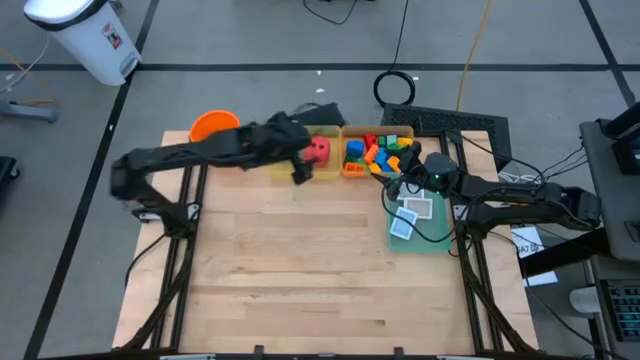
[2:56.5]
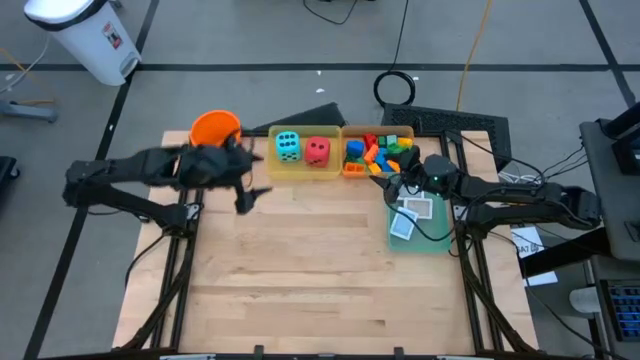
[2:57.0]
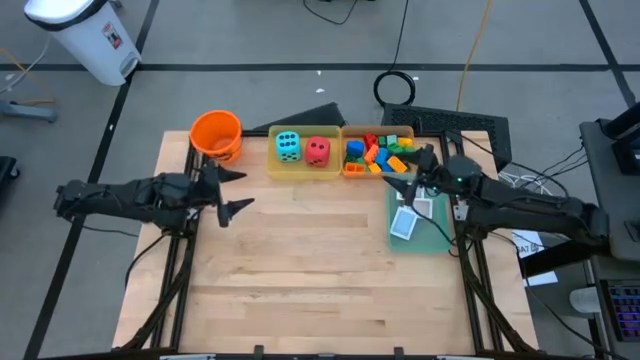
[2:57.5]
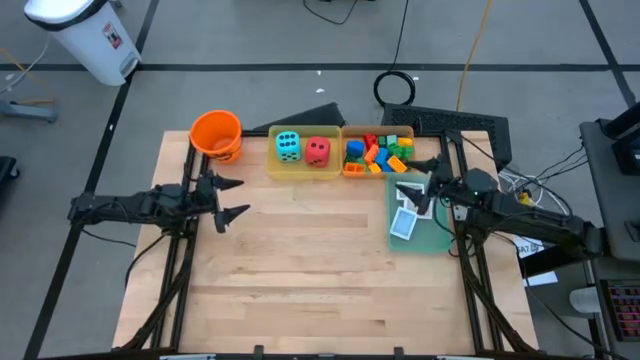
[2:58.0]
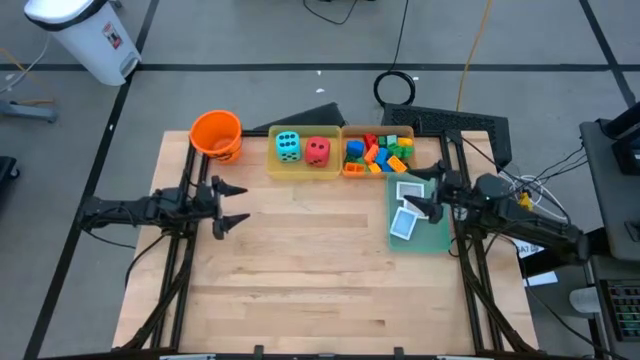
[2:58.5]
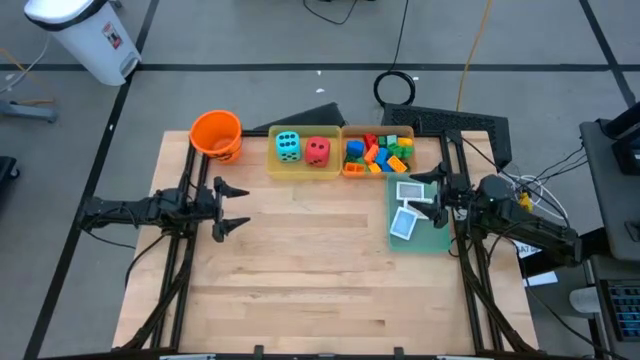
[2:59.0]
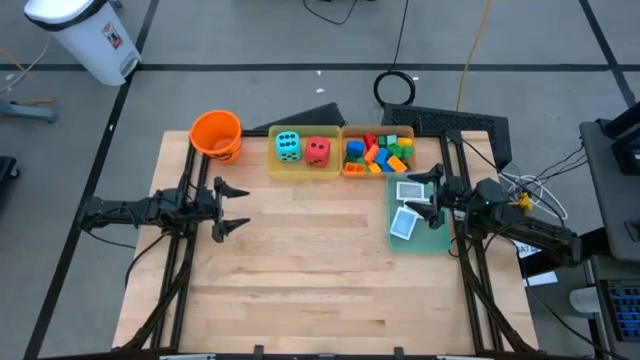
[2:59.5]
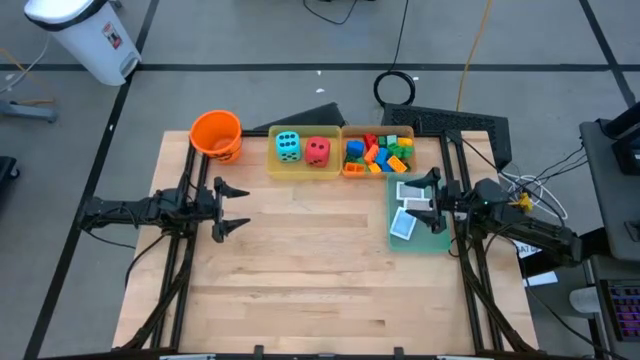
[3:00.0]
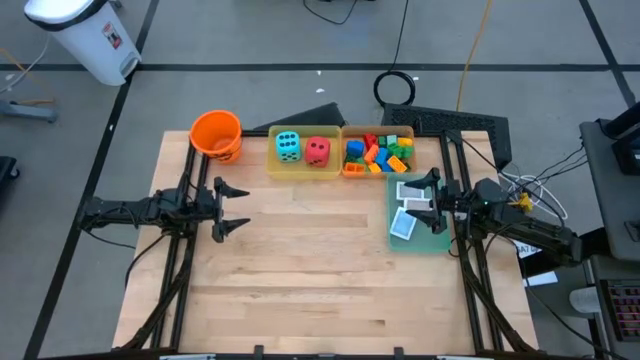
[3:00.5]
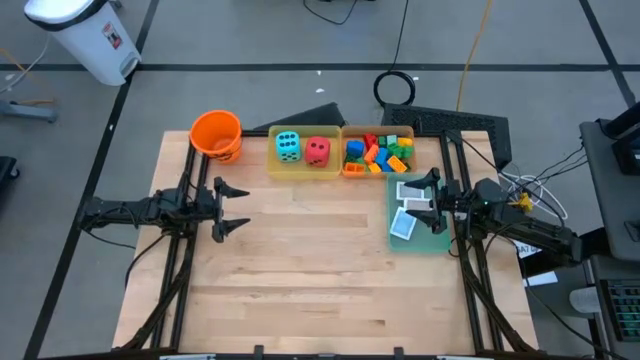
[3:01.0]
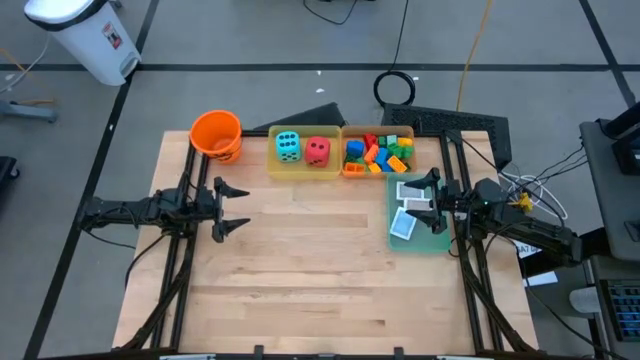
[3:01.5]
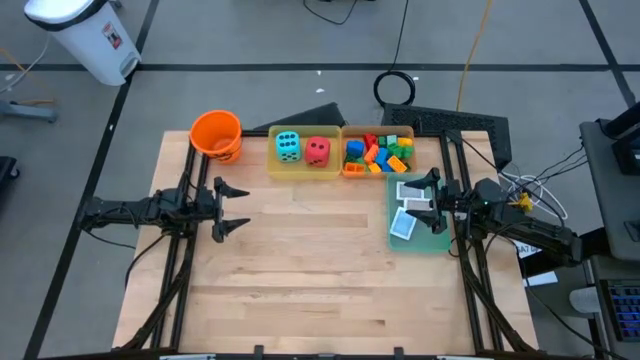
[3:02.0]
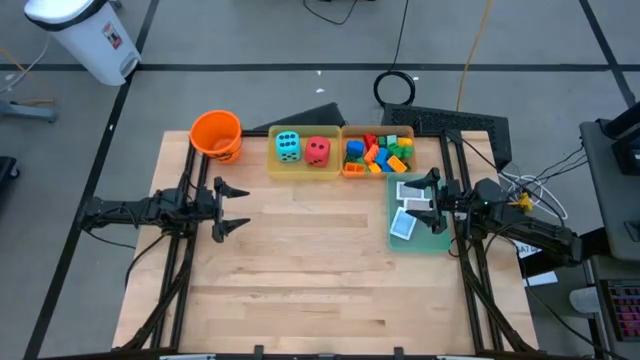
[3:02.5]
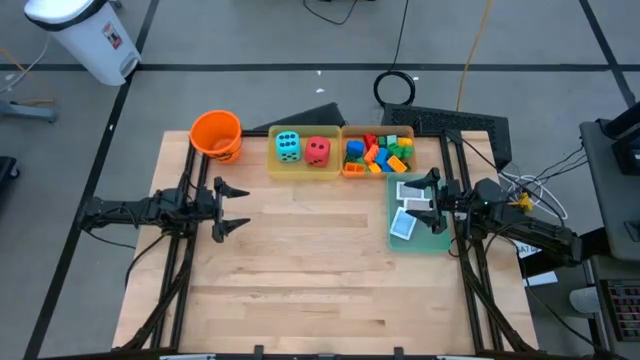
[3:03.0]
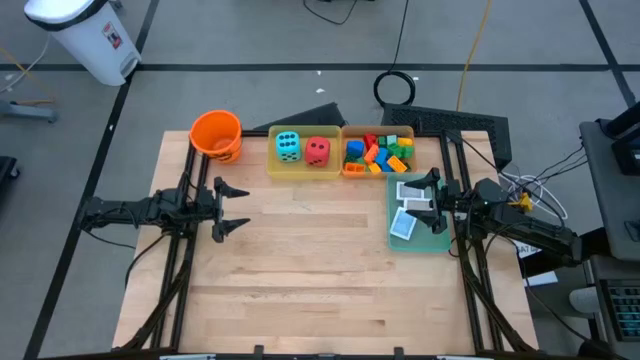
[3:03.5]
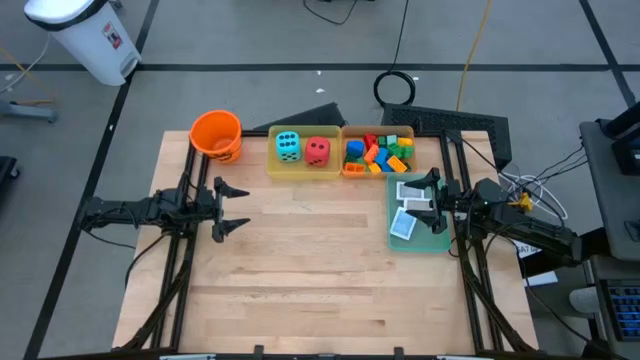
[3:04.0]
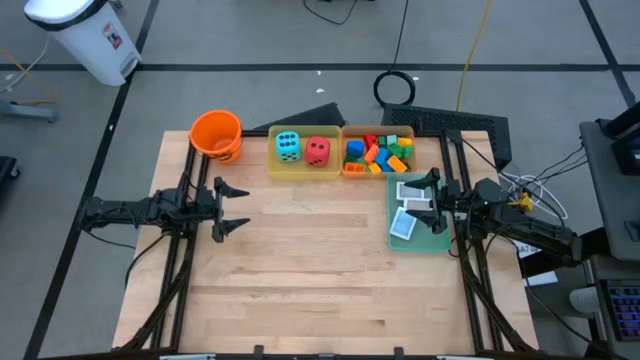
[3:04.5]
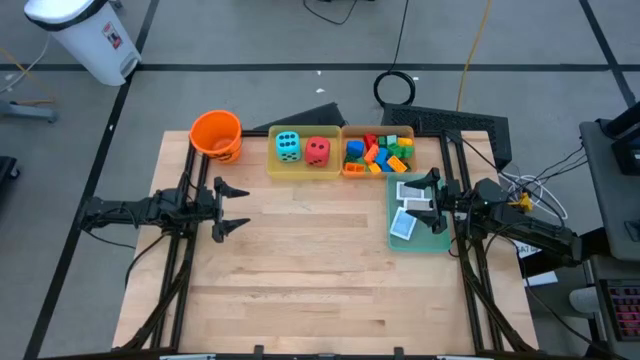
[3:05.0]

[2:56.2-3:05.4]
Task: Pick & Place Toys
Return to Home Position

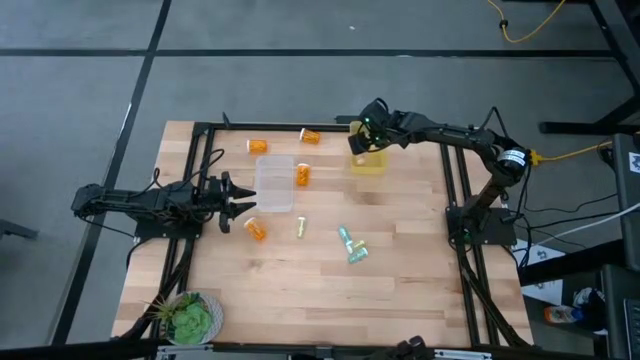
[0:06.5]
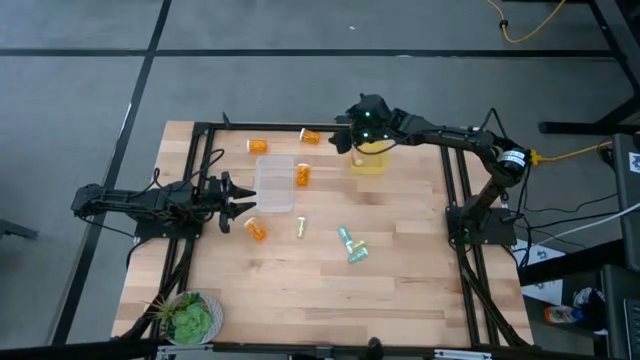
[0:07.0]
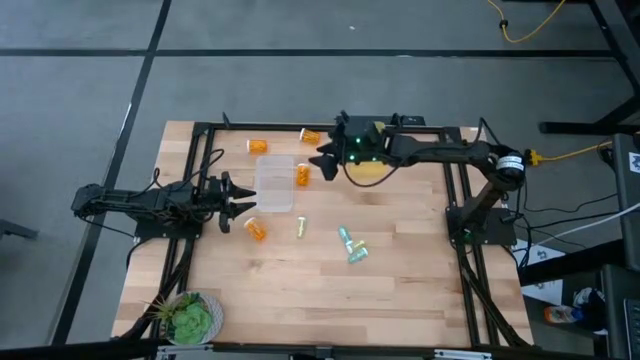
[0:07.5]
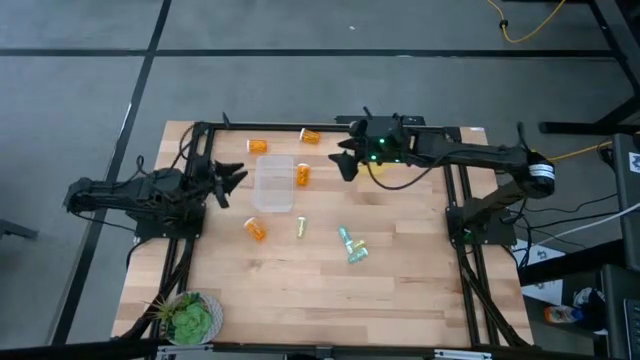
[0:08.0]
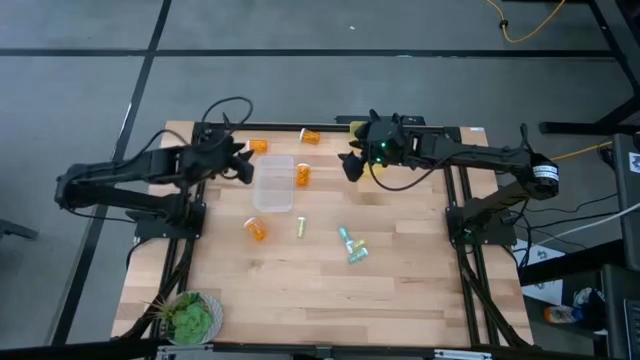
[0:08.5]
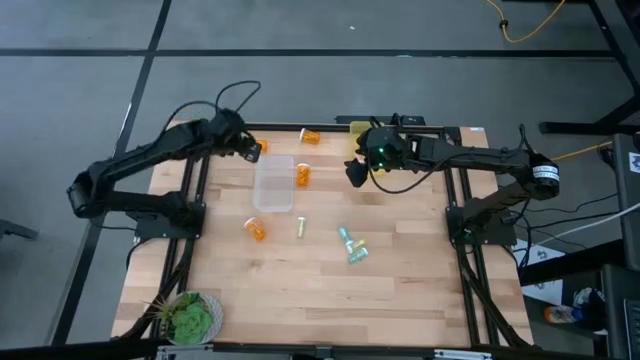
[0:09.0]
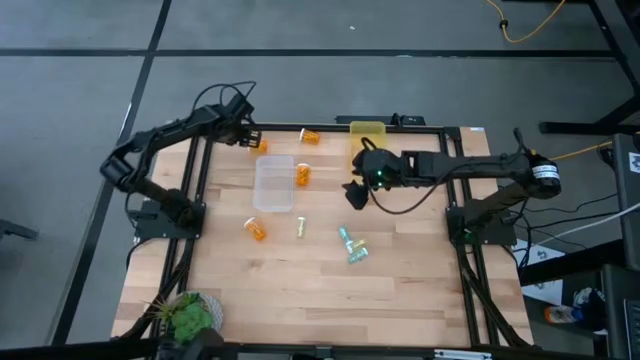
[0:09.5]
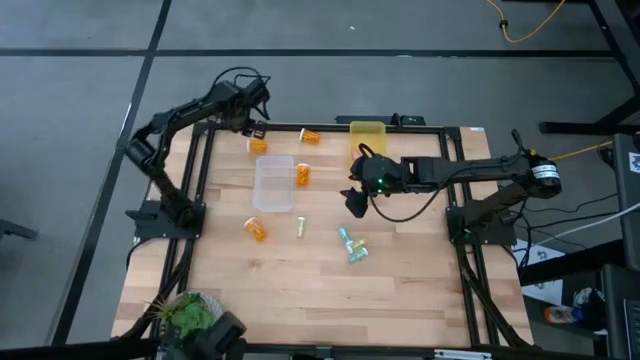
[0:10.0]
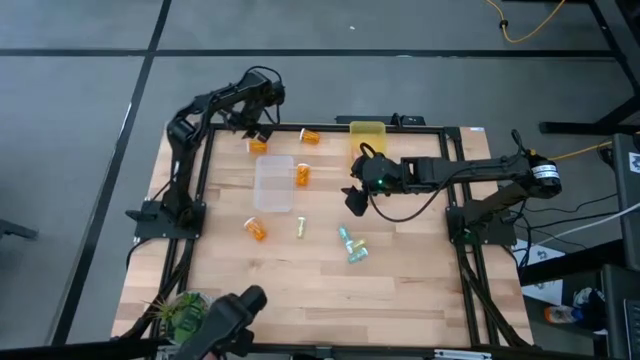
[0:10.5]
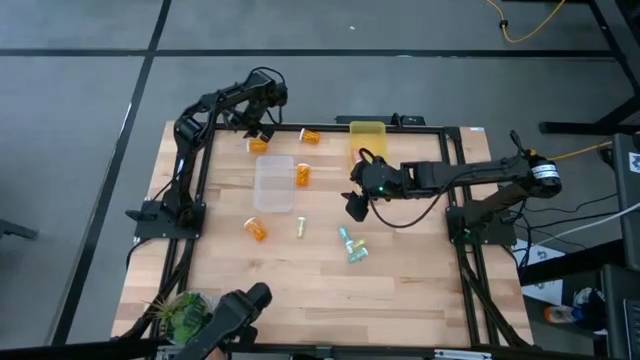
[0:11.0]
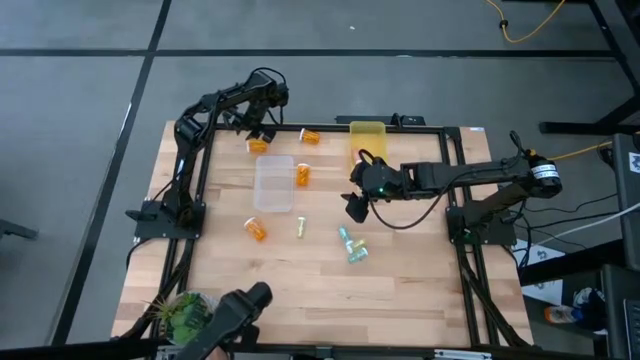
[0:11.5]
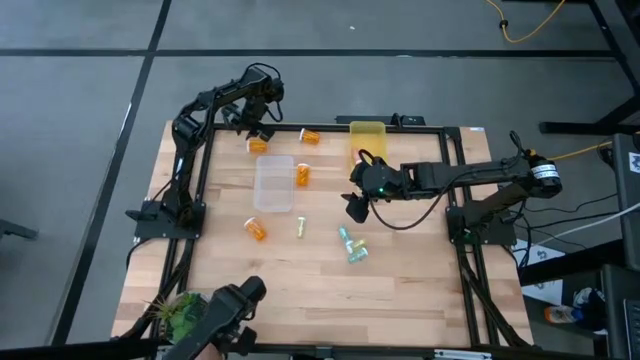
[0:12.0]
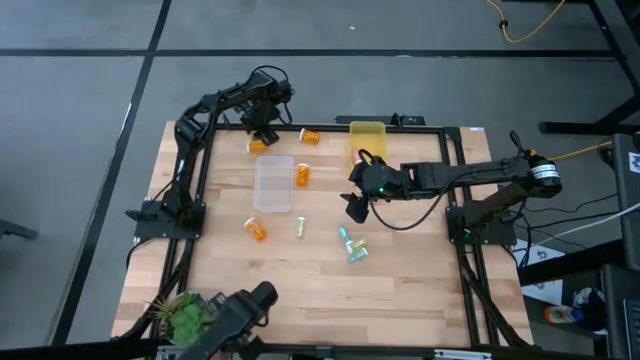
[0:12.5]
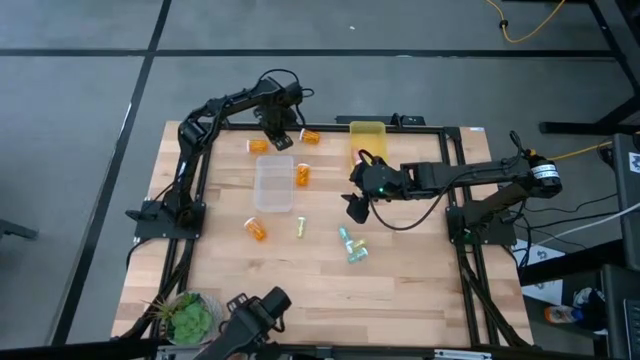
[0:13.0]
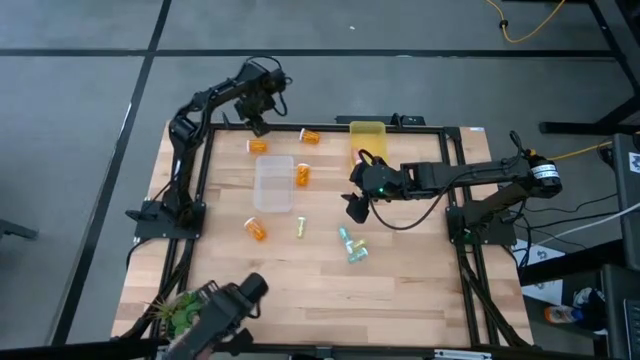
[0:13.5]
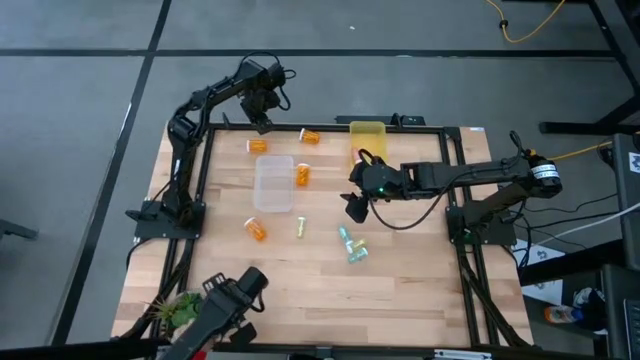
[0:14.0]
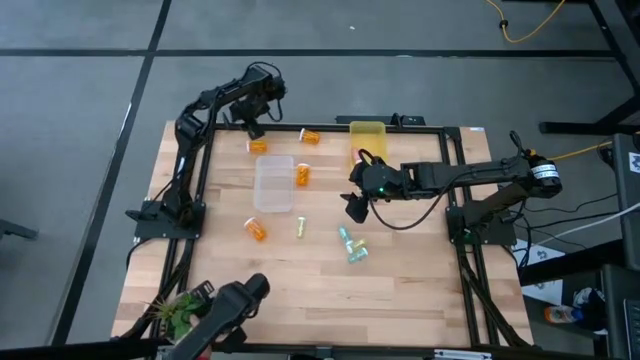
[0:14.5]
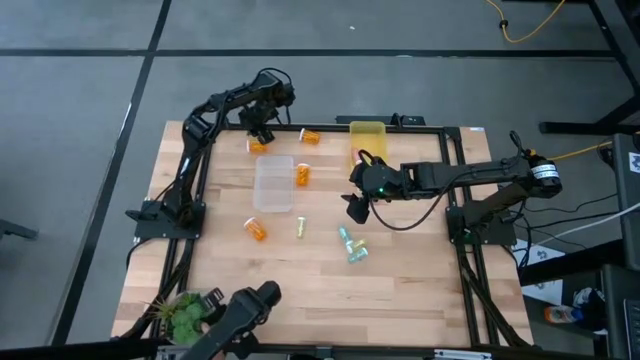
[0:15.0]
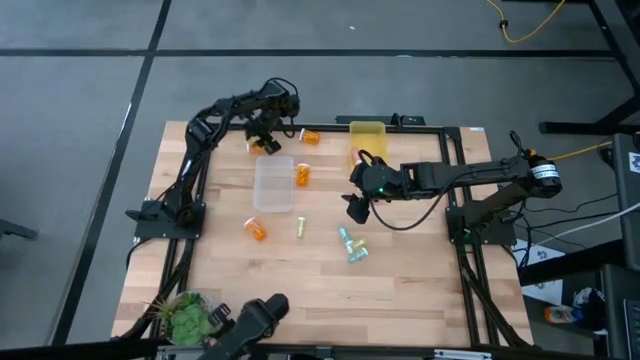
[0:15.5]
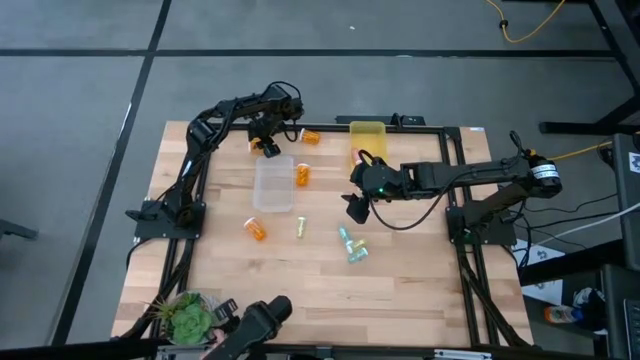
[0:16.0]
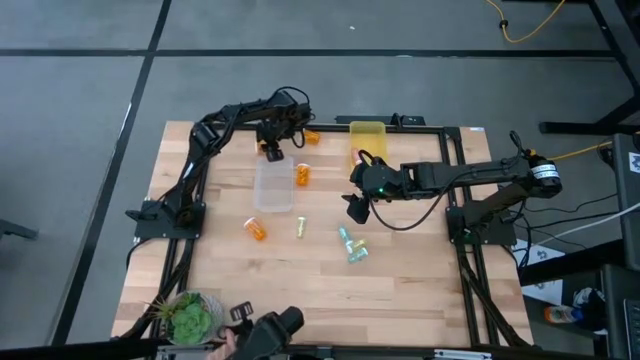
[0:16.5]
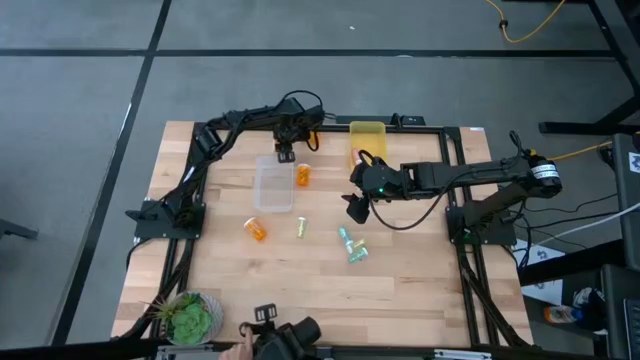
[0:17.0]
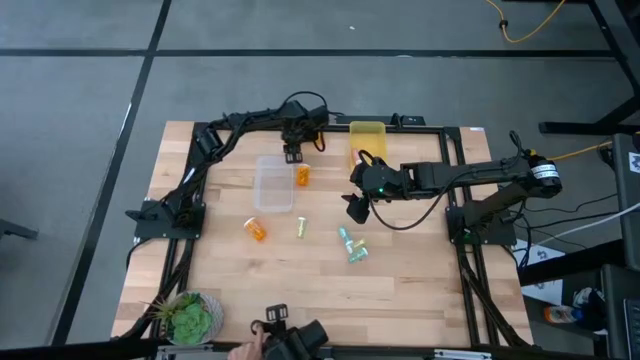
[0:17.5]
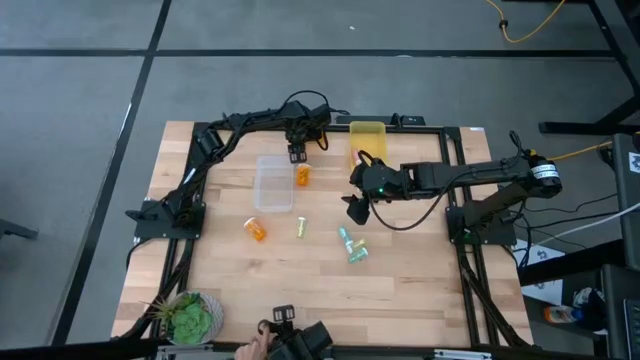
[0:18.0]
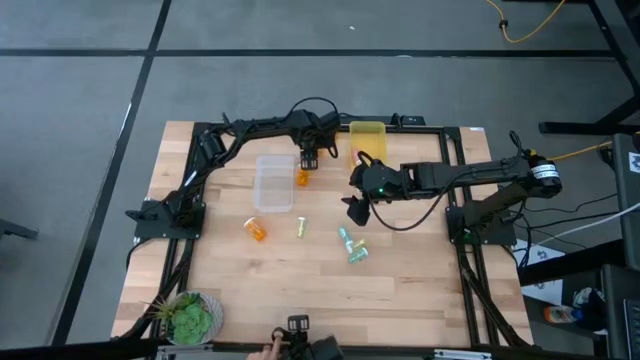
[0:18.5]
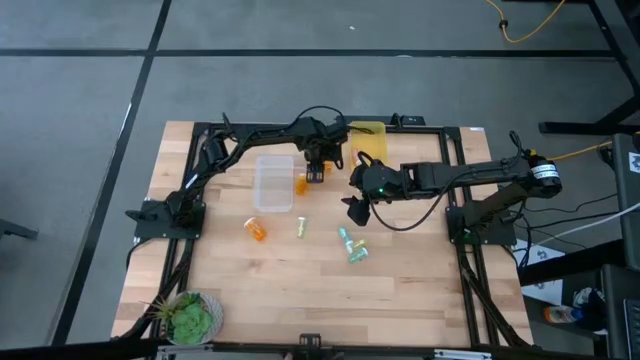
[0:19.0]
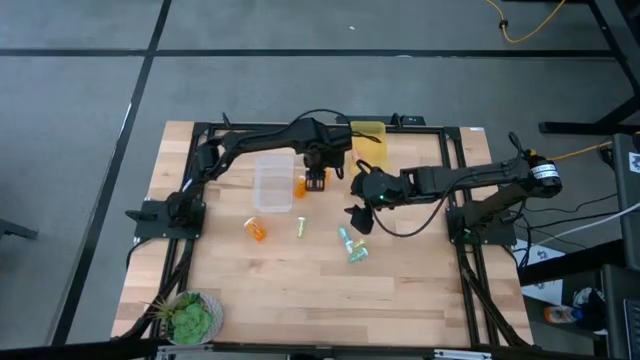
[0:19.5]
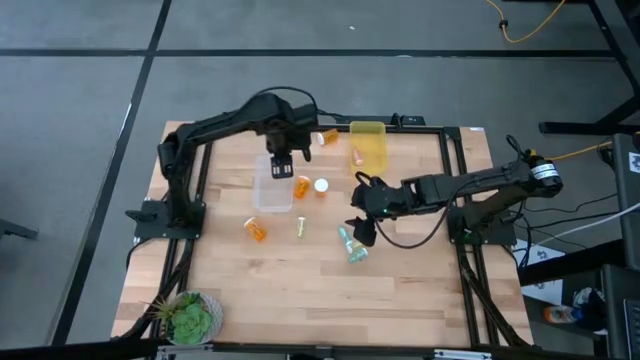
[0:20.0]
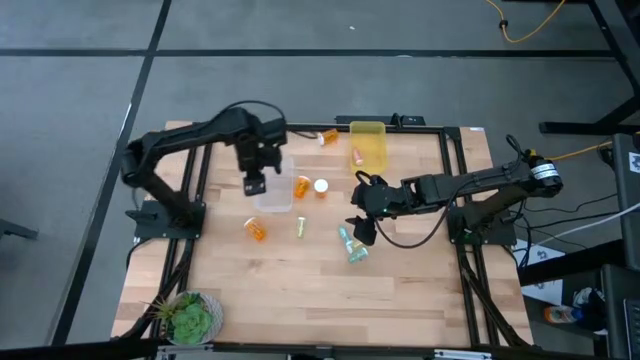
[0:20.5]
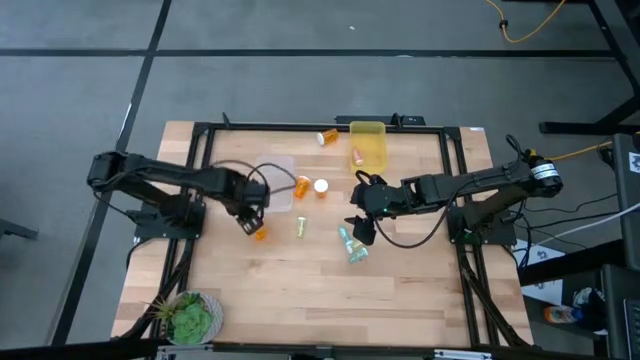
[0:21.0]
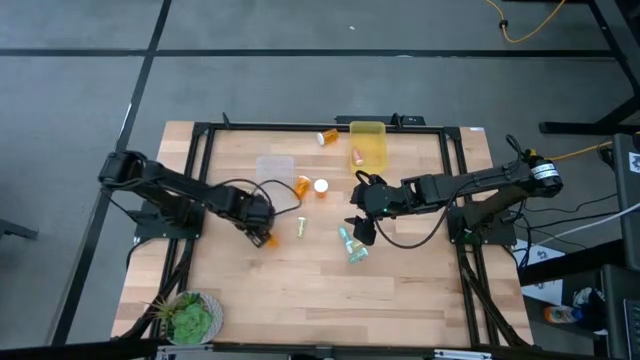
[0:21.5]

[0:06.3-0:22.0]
Task: Pick and place medicine bottles into bin by pill shape (circle, oval)
Move the large orange pill bottles to the center of the table
